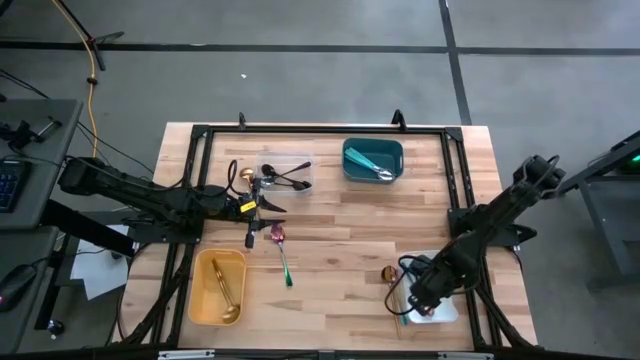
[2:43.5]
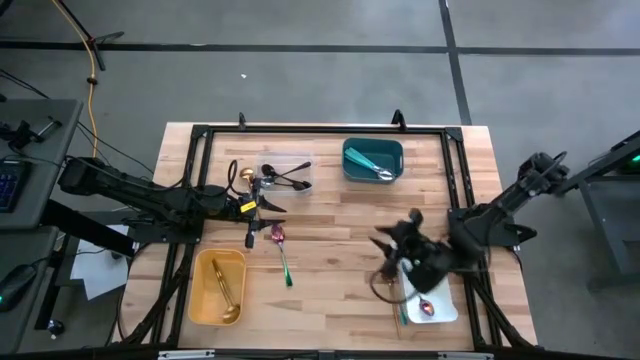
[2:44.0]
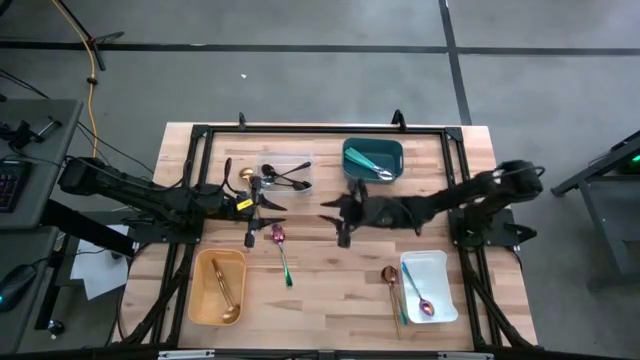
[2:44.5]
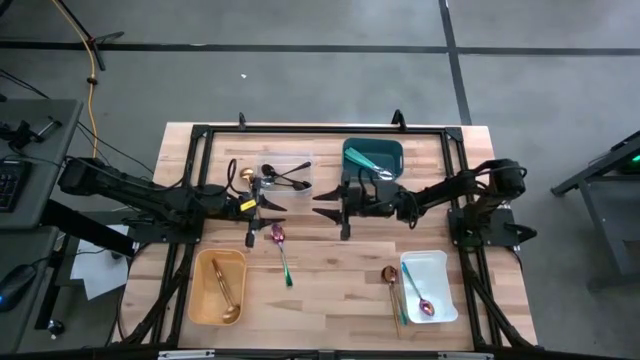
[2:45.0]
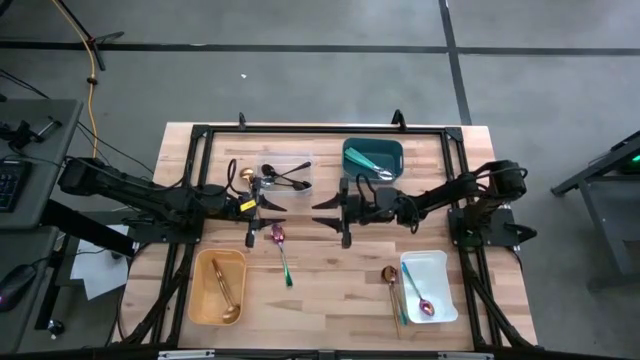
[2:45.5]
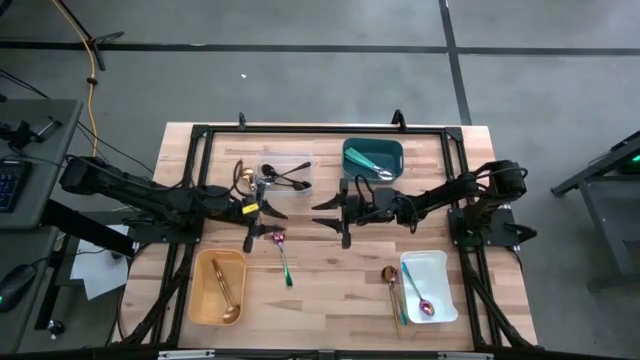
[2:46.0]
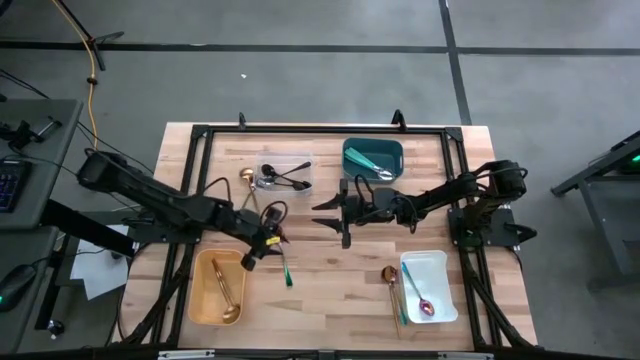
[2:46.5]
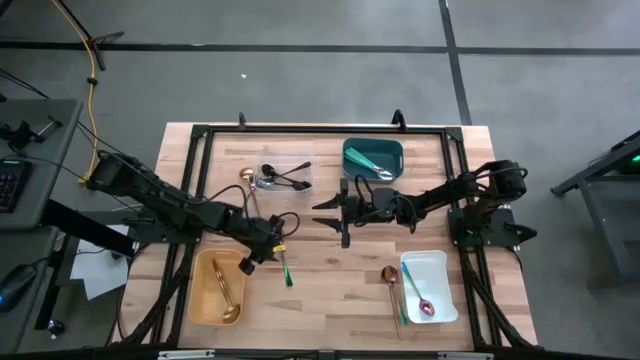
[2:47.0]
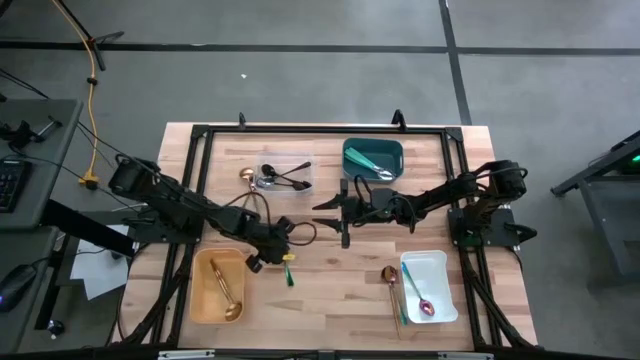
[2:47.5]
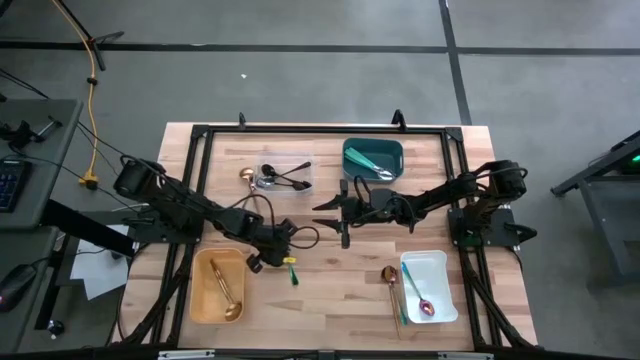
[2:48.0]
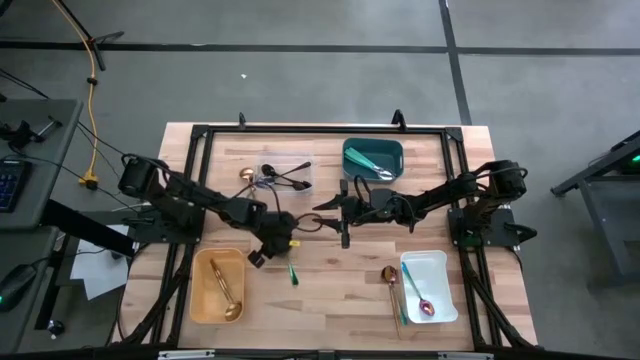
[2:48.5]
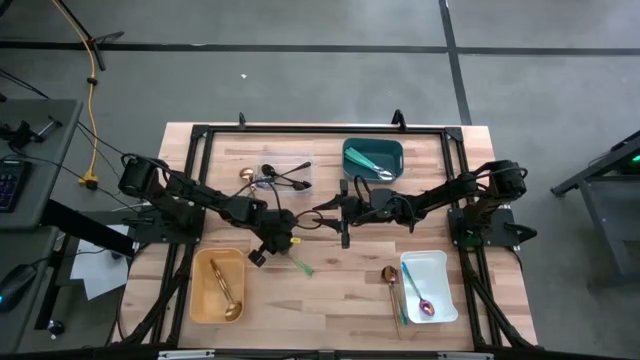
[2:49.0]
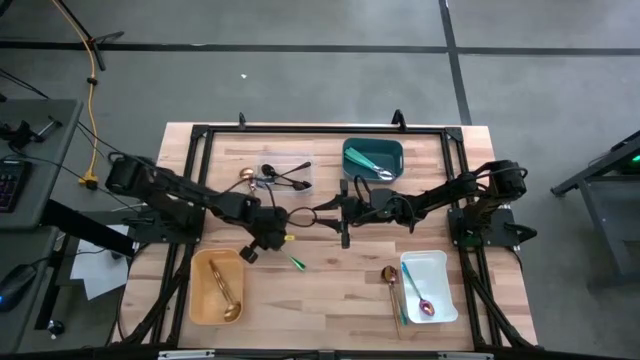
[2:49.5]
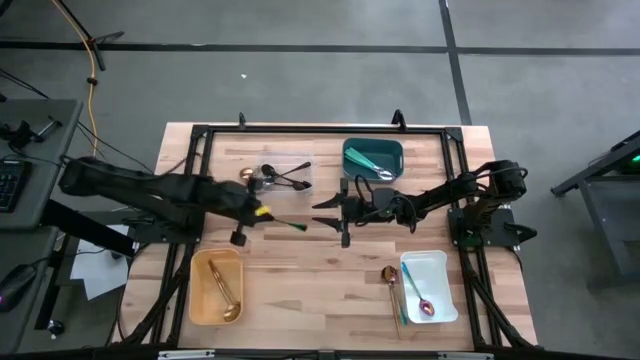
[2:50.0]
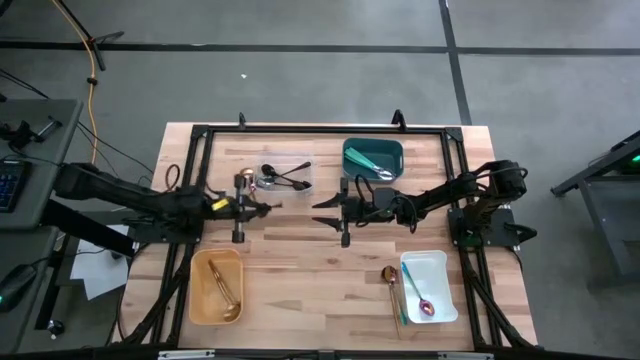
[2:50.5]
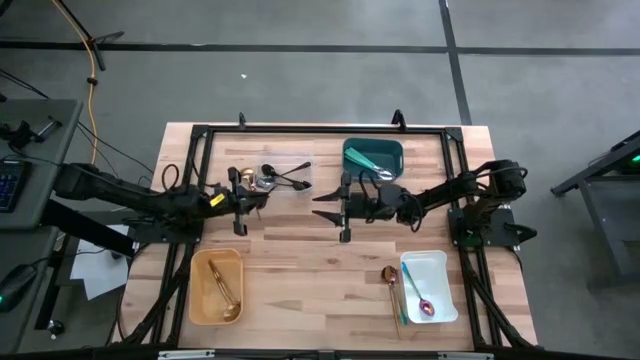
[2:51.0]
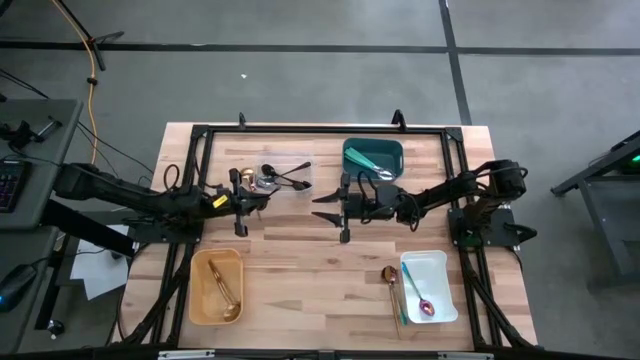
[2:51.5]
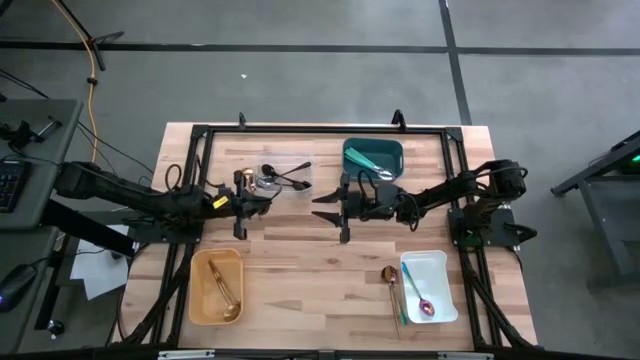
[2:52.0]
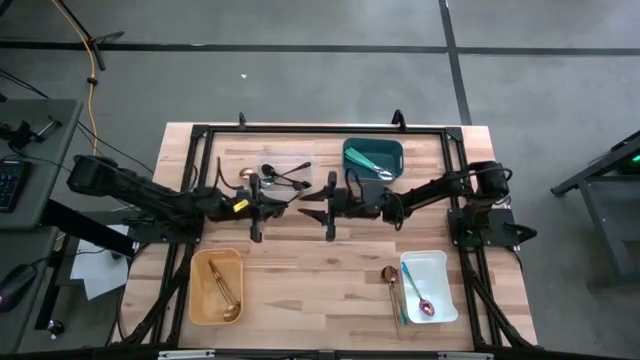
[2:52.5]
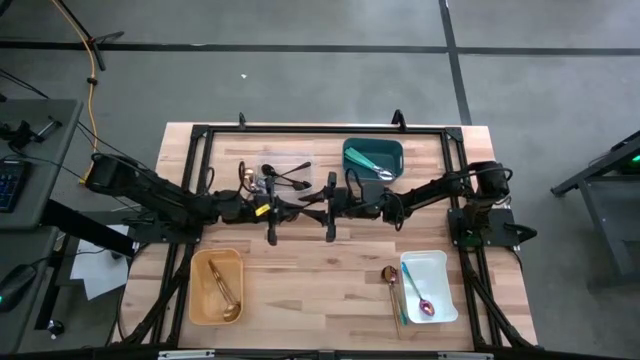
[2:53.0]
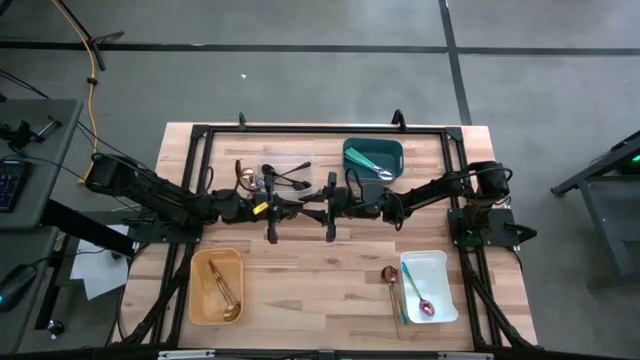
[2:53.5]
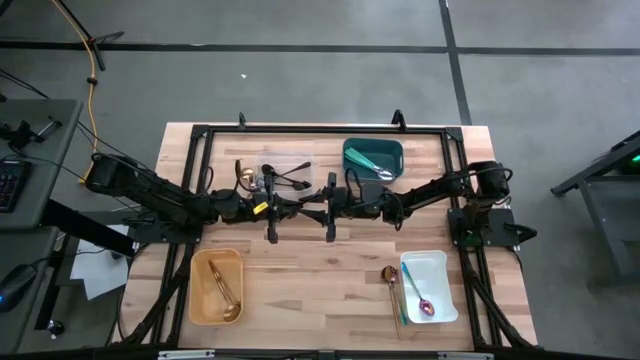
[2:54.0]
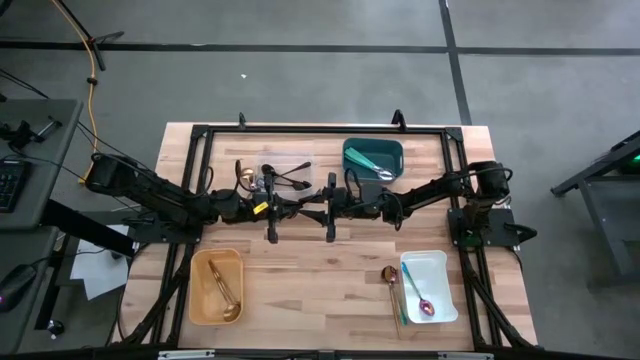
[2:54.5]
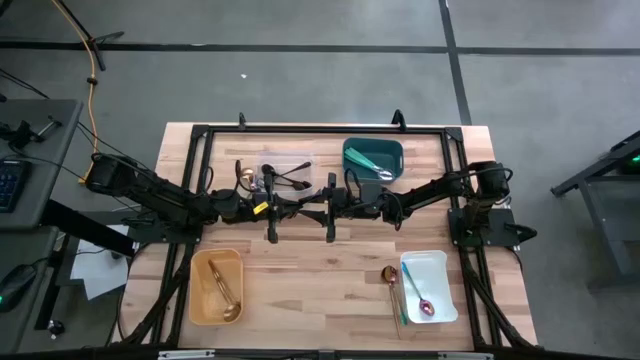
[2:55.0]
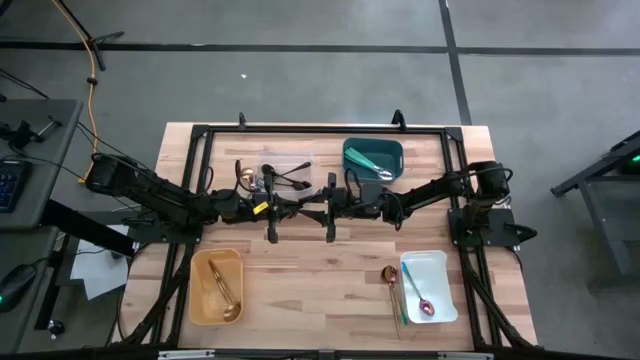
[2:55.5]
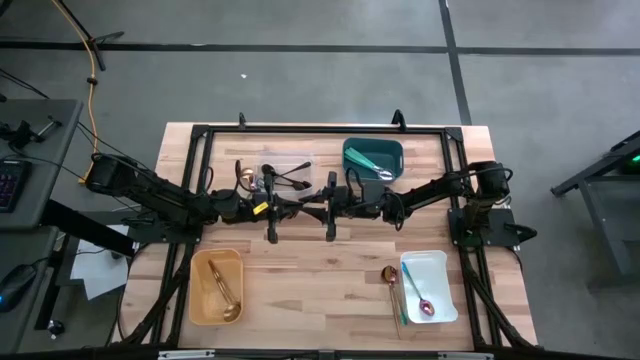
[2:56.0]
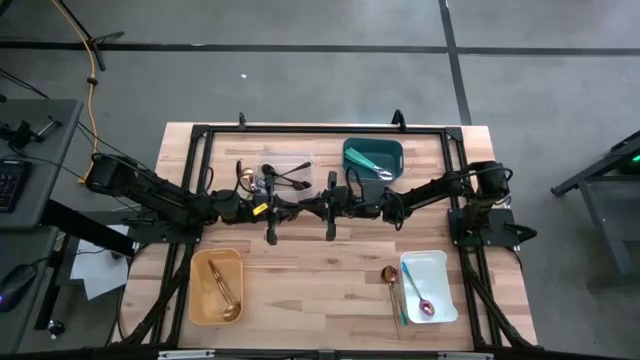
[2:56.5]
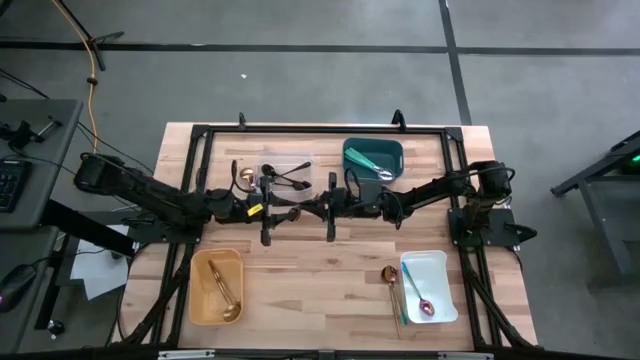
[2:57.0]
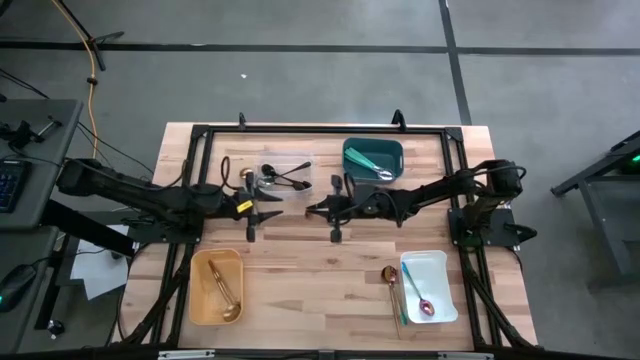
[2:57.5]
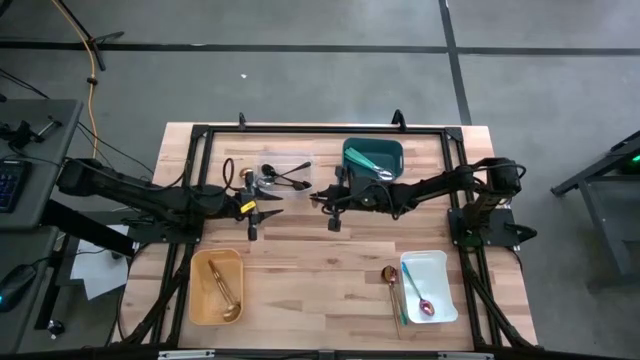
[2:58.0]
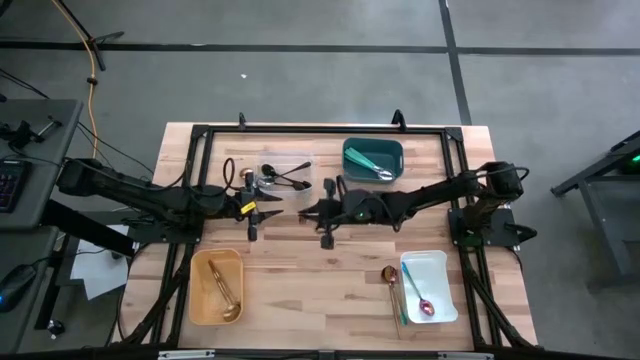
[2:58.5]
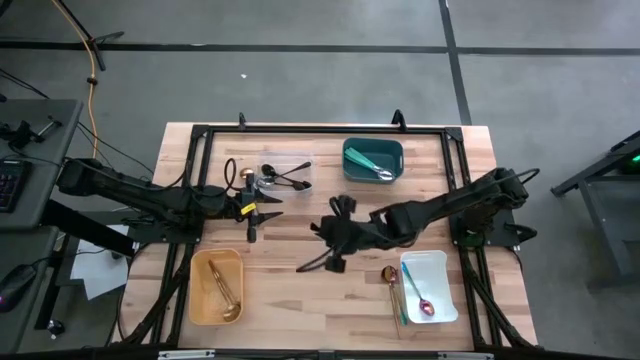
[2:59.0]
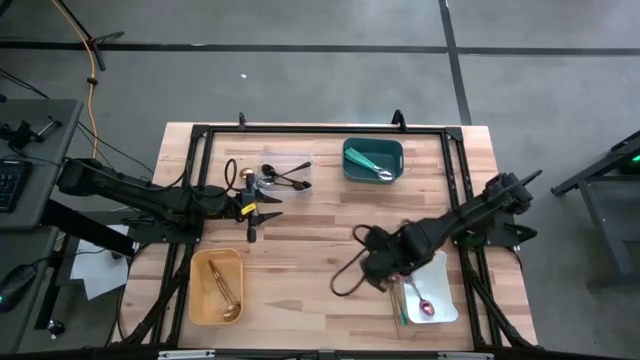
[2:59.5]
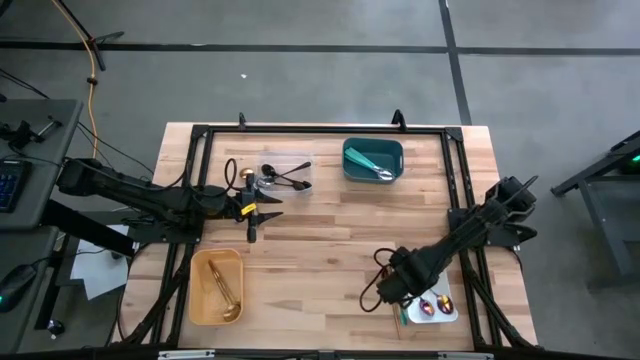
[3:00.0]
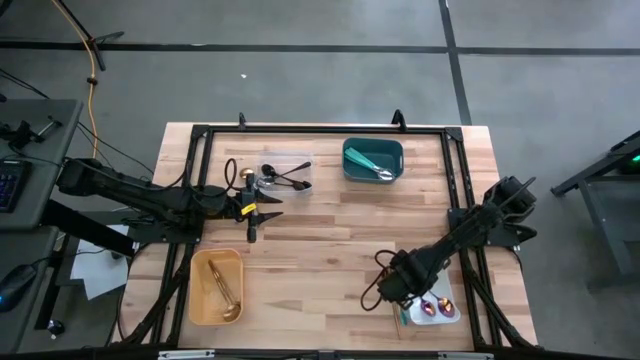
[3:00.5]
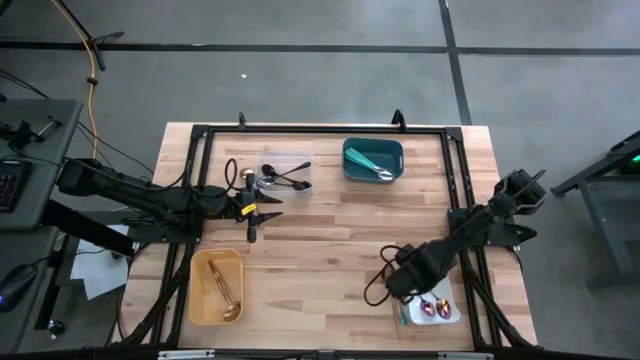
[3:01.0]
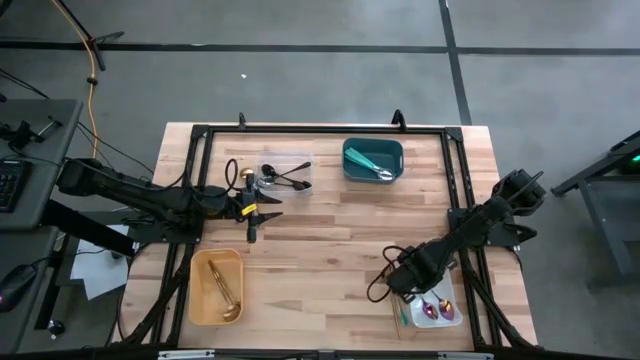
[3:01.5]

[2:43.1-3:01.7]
Task: Sort silverware by color (type)
Put the purple spoon into the white bin

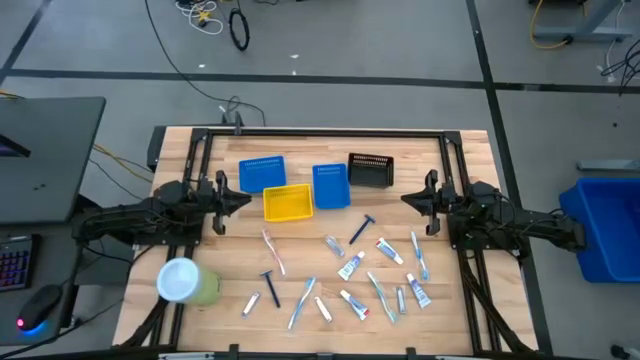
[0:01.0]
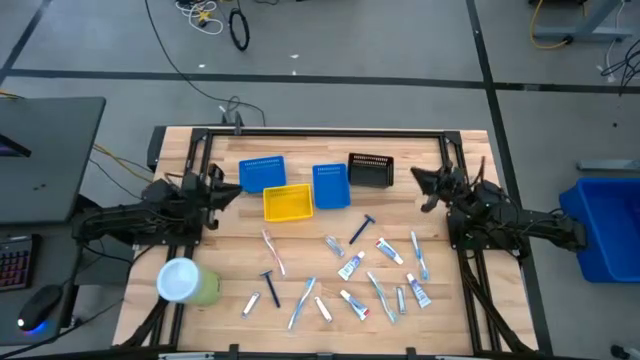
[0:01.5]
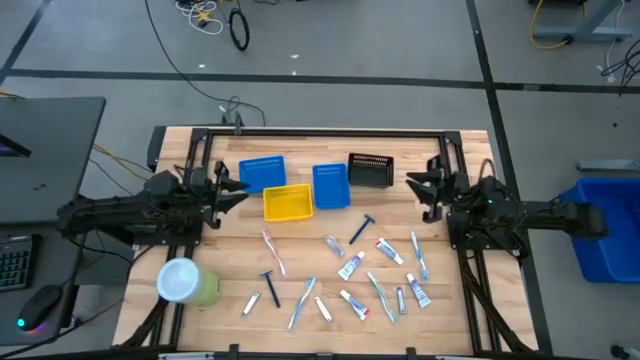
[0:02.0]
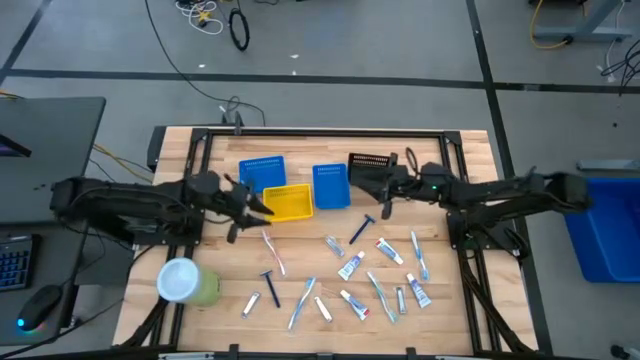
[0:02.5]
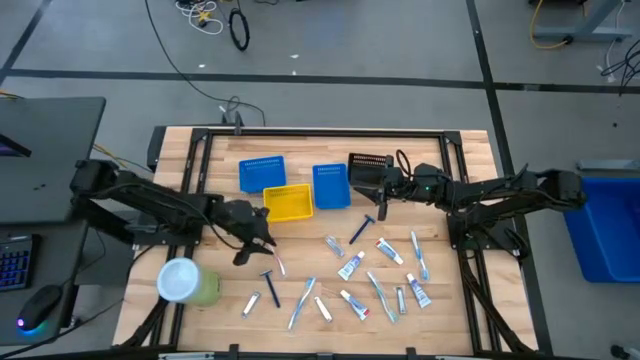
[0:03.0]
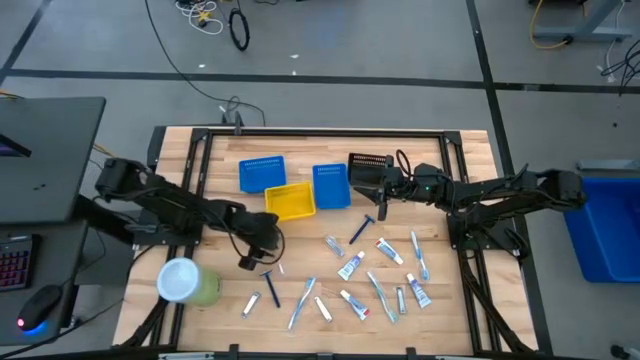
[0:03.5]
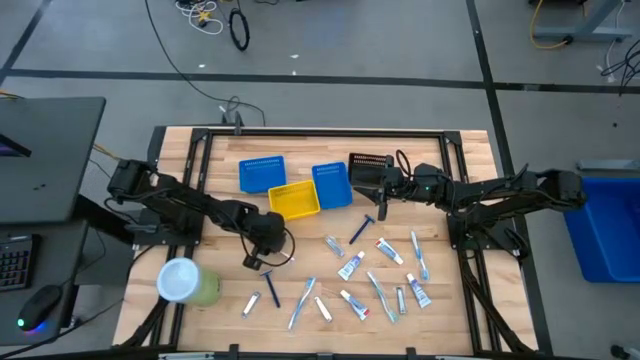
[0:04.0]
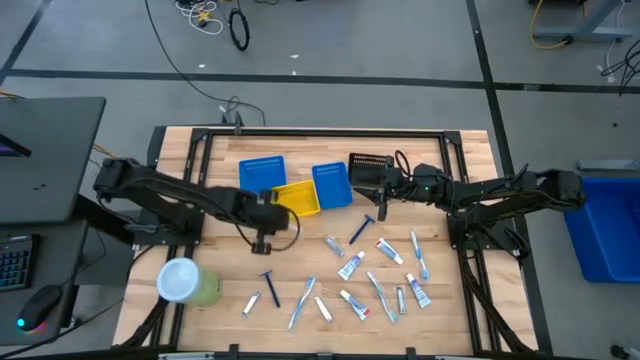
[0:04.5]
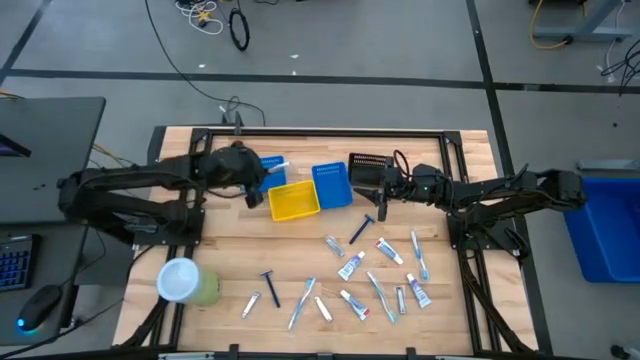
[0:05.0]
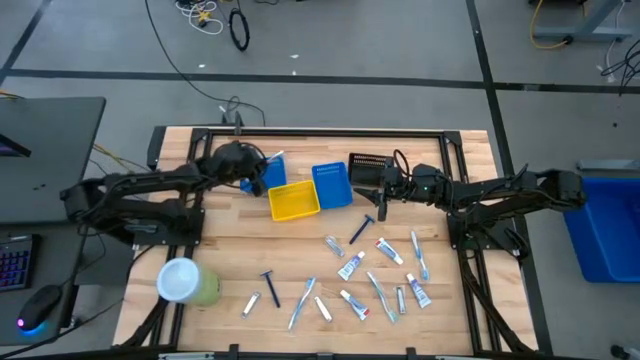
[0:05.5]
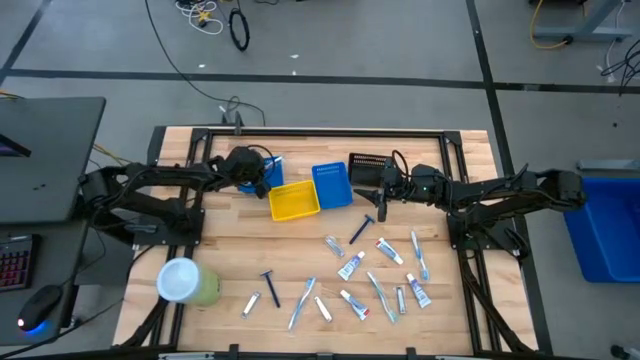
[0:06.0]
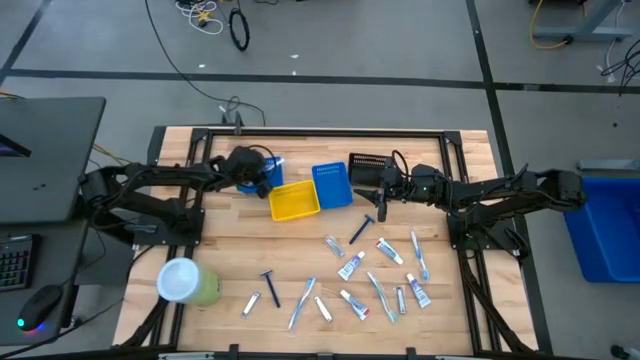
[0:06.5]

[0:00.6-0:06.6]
Task: Pick & Place Travel size toiletries
Put the red toothbrush into the left blue bin
